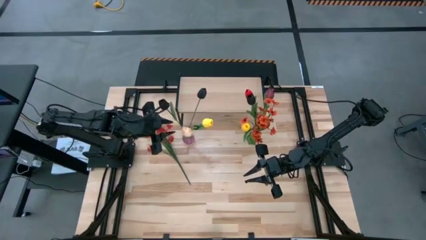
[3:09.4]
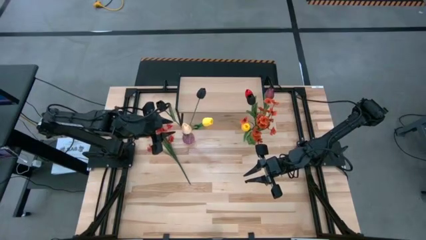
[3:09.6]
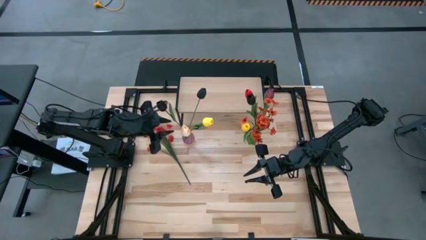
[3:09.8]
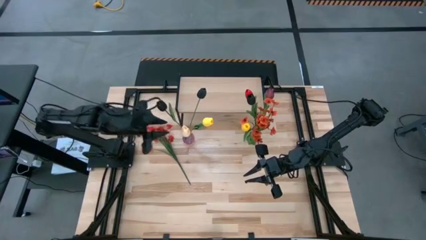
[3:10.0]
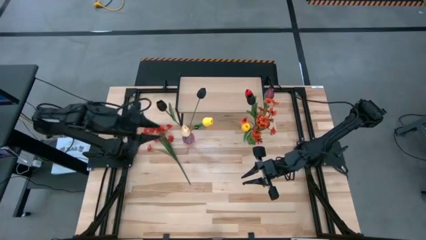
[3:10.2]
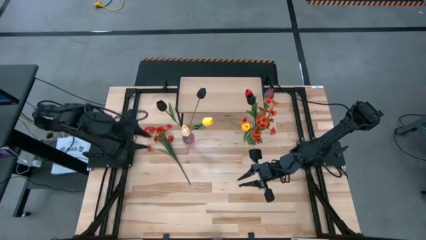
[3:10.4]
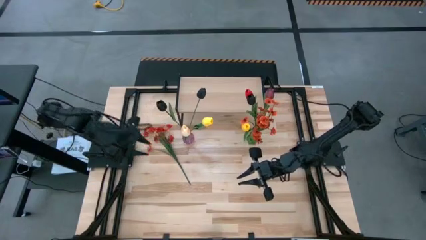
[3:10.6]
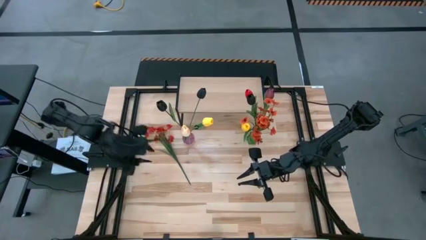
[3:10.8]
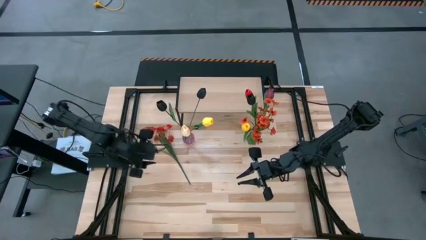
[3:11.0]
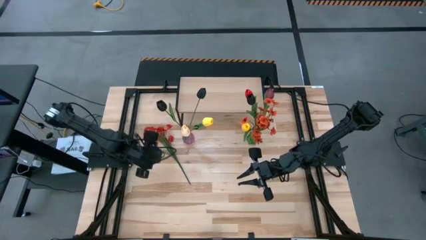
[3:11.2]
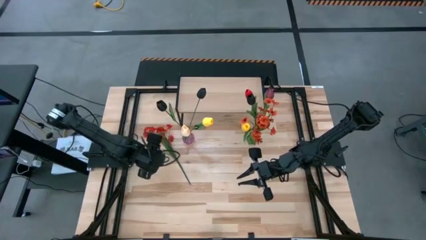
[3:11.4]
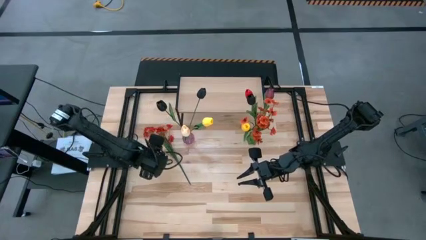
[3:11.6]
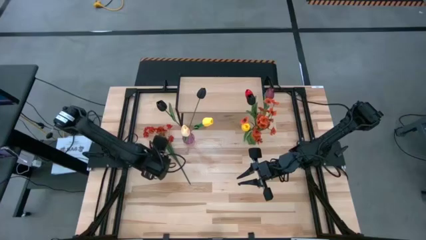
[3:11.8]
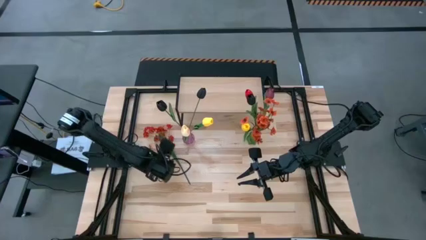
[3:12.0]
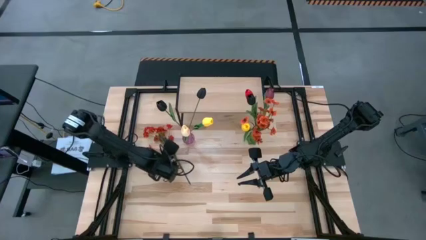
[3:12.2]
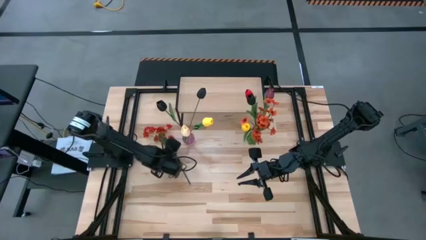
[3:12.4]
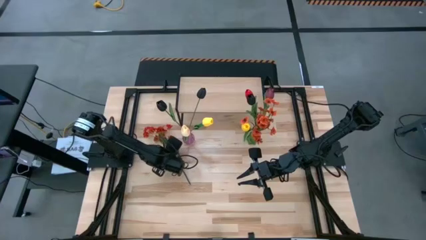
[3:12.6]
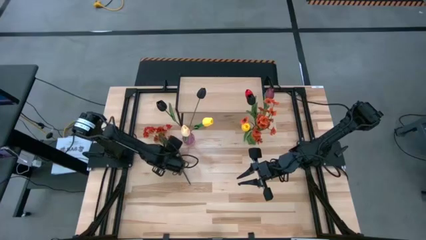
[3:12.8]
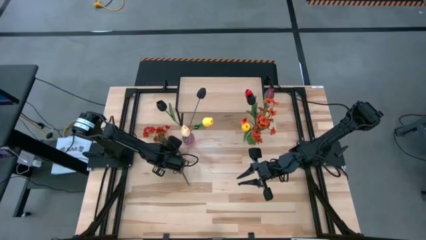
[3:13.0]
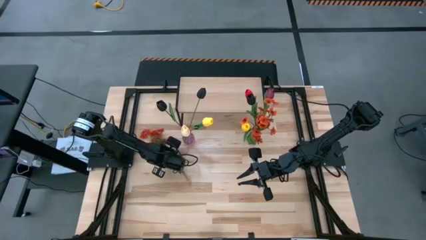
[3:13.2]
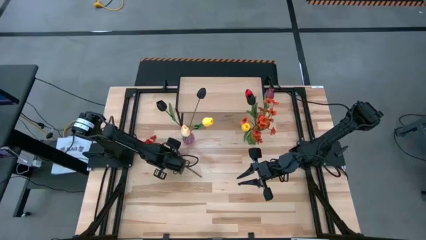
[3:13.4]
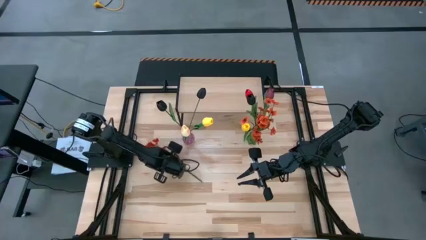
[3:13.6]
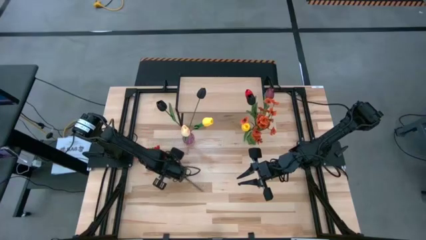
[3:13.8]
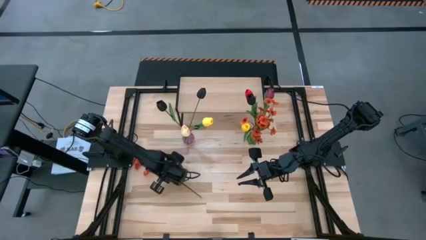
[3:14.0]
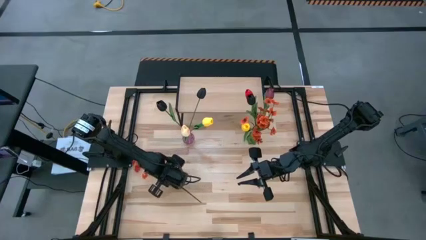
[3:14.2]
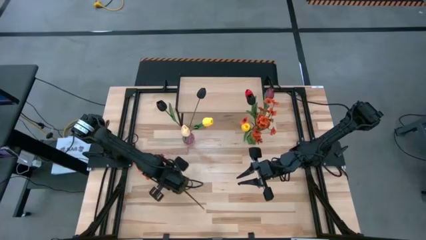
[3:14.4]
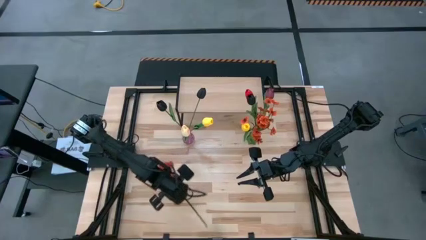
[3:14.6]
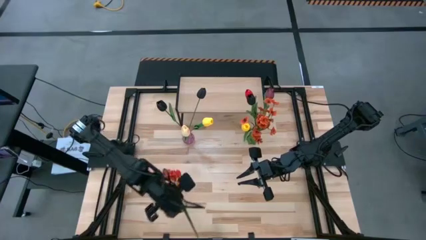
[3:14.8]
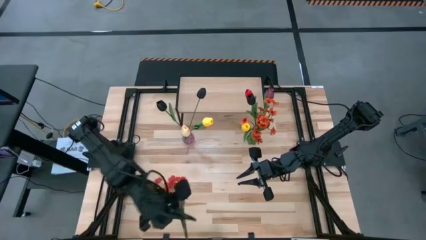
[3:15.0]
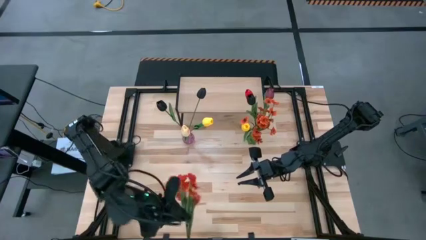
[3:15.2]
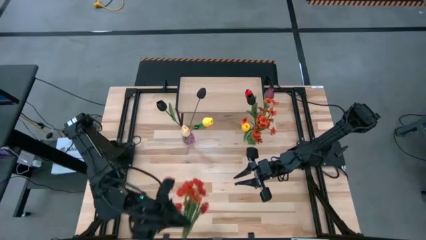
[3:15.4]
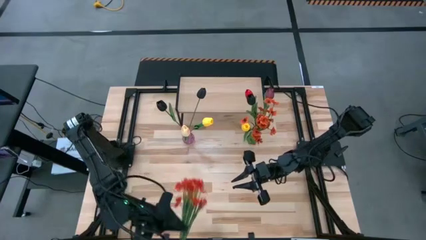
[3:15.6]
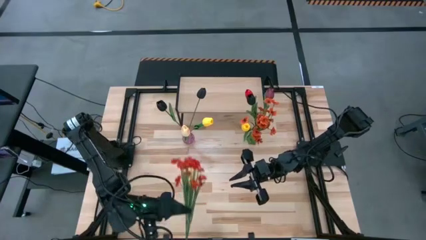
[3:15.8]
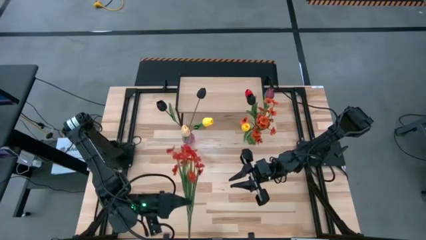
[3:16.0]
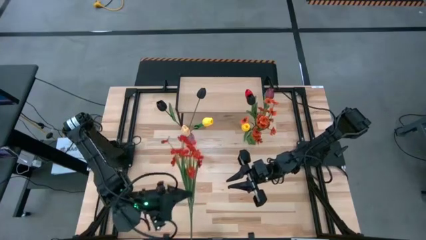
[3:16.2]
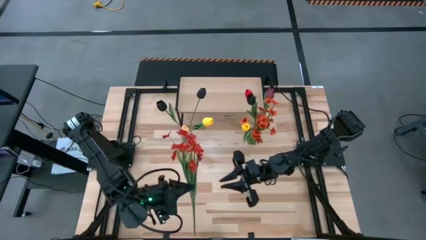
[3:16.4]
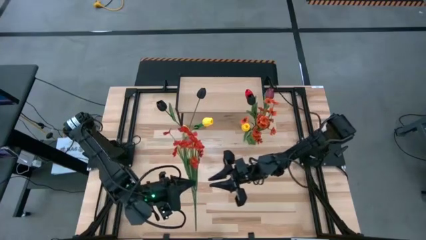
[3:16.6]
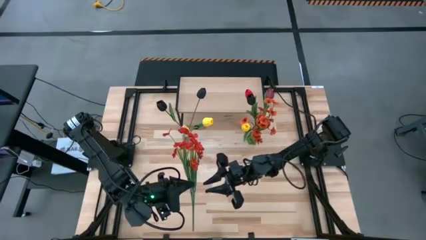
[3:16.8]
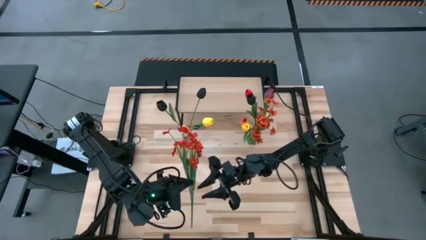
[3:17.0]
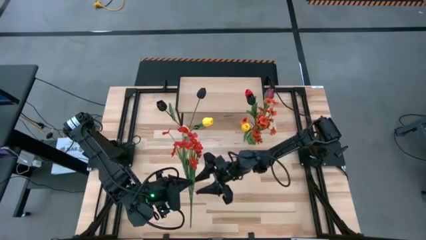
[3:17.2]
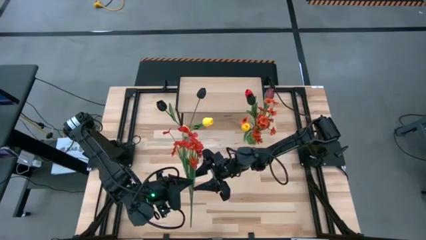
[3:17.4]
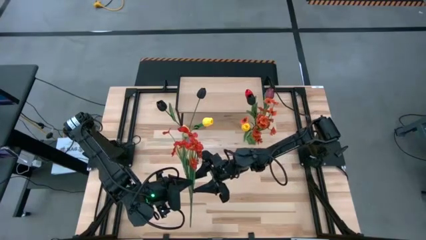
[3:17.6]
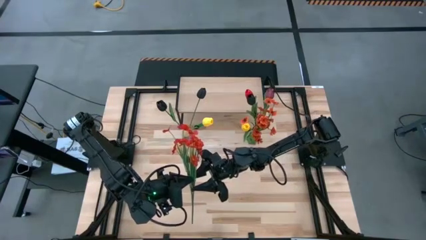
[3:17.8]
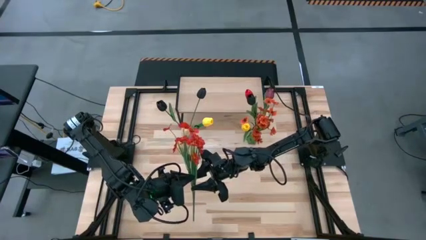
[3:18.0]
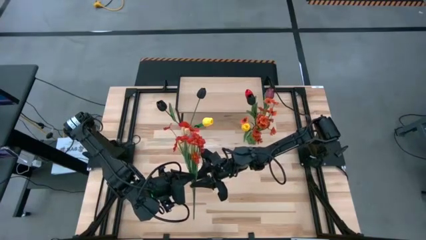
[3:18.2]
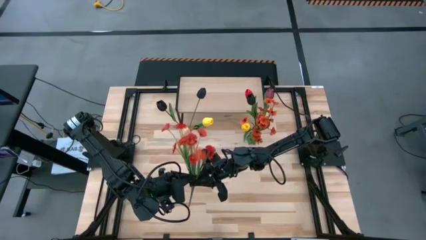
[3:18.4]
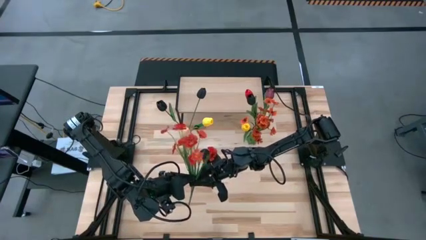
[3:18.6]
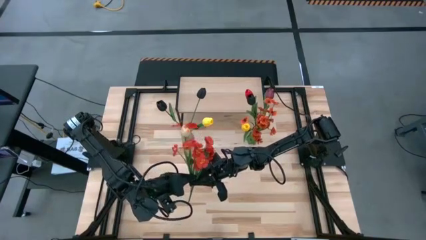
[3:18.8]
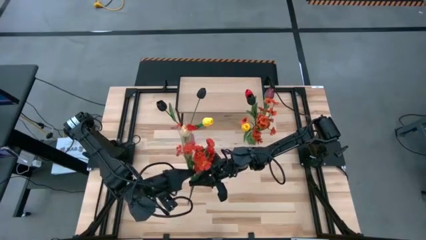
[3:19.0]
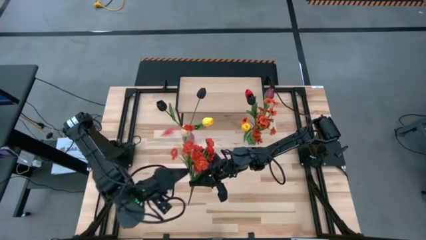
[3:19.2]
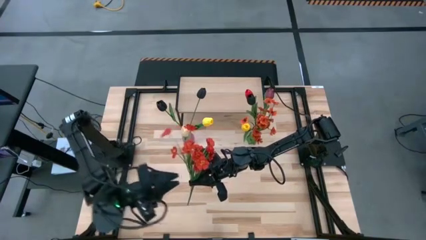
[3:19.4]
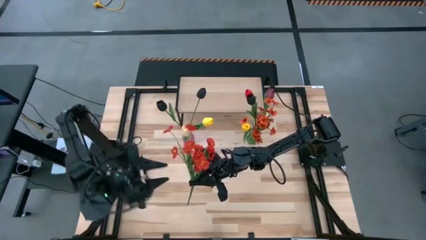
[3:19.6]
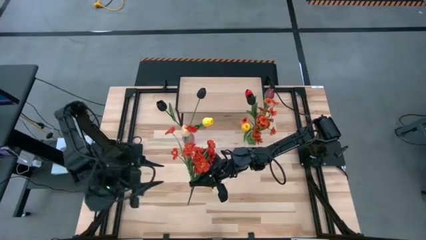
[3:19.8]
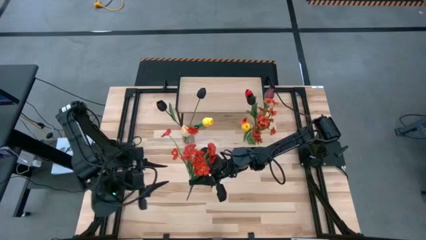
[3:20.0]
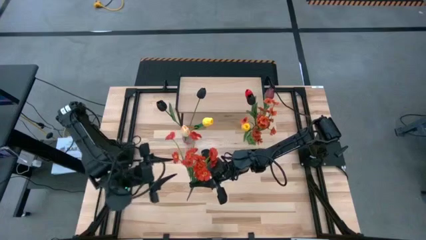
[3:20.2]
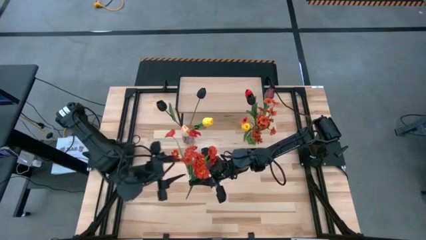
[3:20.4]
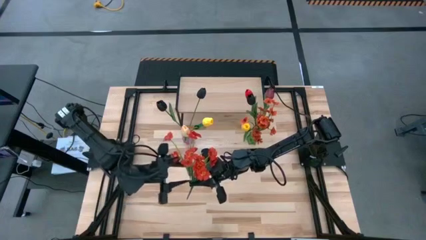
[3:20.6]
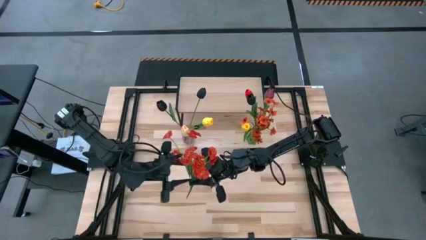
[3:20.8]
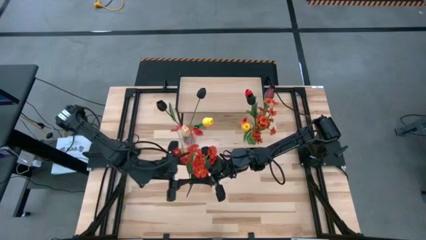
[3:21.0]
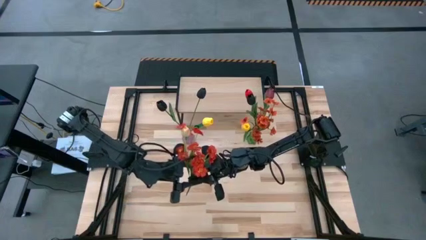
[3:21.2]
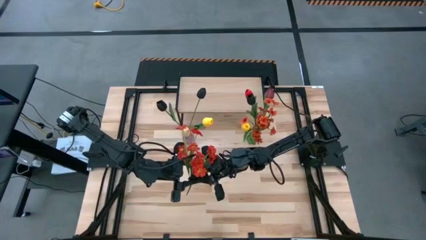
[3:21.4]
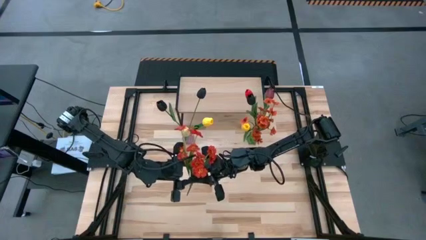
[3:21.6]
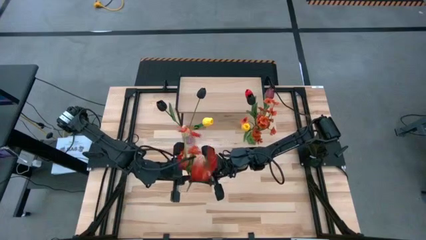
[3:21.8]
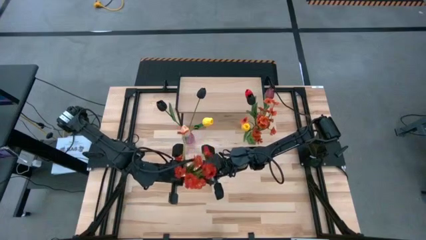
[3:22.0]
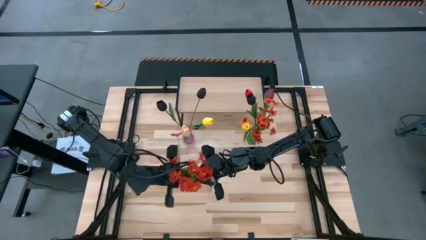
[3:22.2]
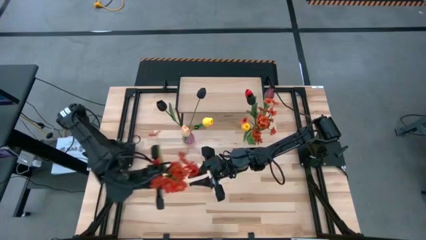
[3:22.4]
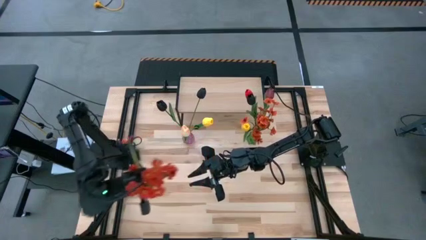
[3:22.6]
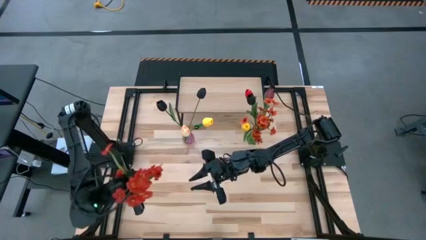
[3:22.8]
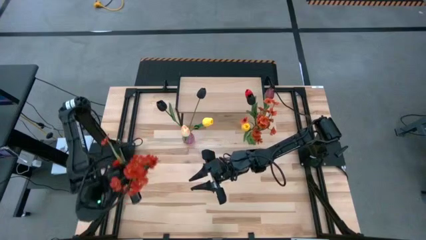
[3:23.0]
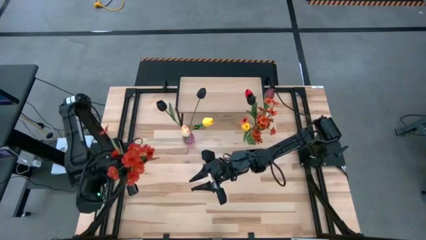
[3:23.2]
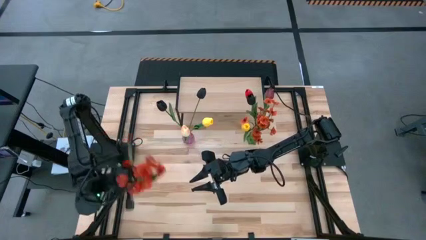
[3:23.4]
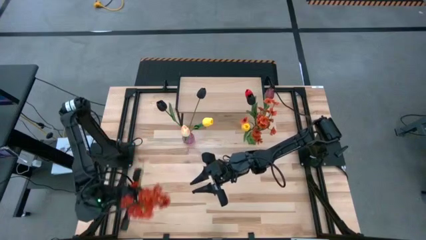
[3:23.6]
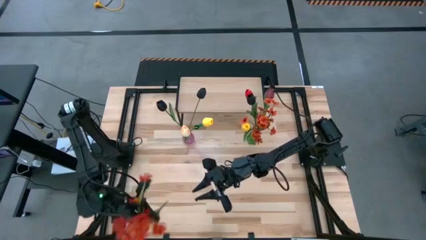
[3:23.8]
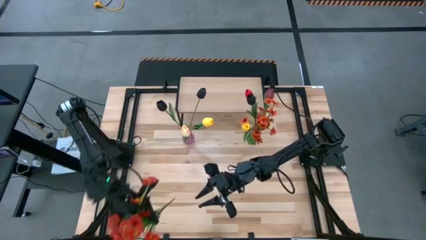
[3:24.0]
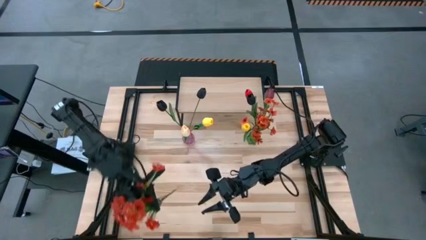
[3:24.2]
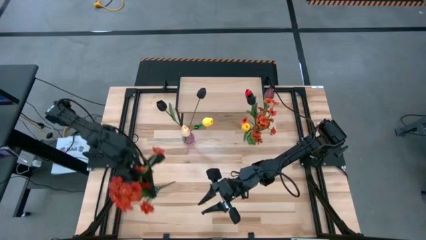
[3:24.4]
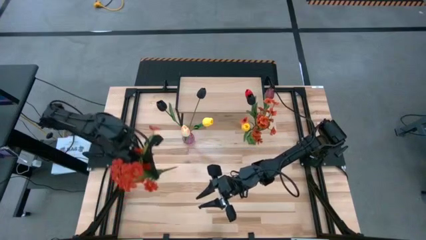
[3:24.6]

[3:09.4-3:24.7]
Task: Pick and place flowers into a vace then onto a shelf
Put the orange flowers into the purple vase

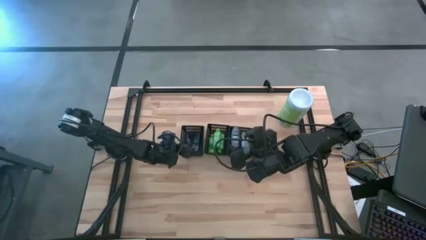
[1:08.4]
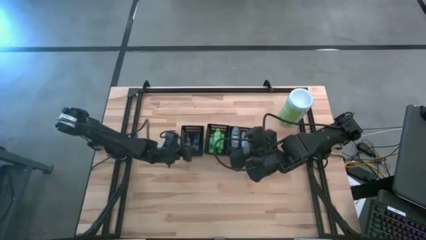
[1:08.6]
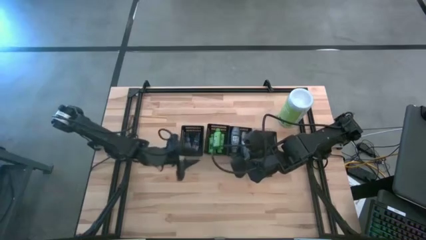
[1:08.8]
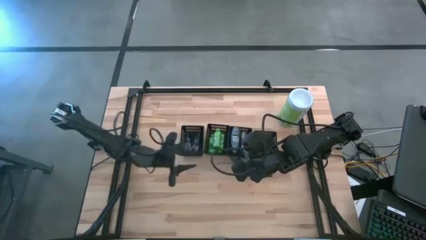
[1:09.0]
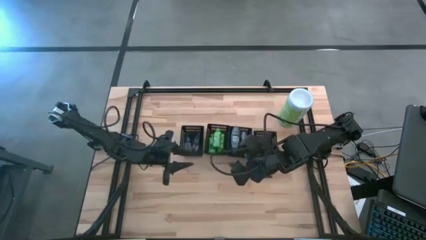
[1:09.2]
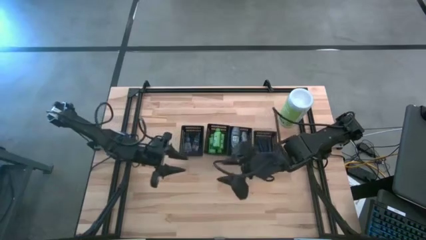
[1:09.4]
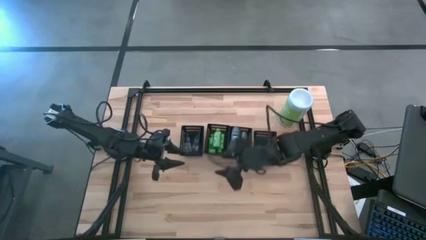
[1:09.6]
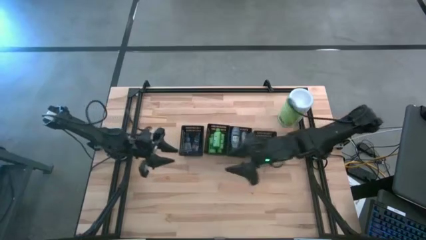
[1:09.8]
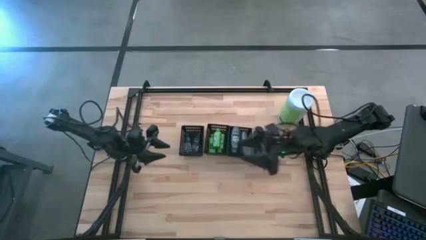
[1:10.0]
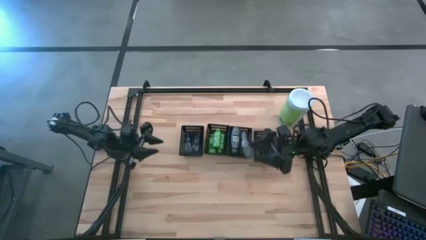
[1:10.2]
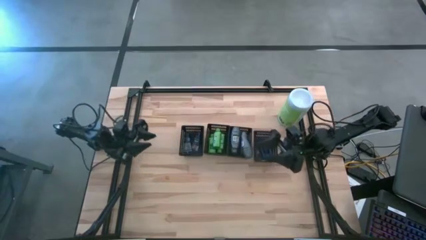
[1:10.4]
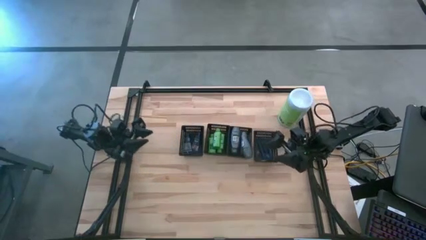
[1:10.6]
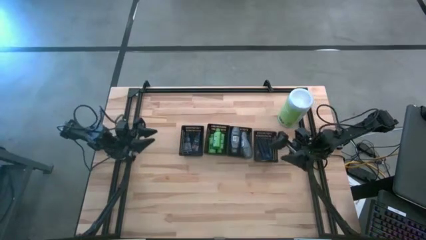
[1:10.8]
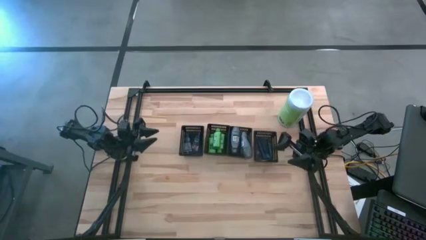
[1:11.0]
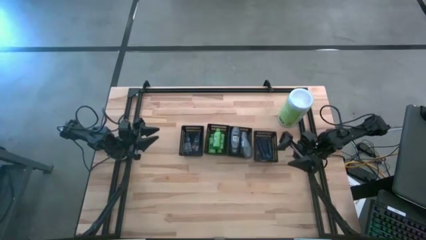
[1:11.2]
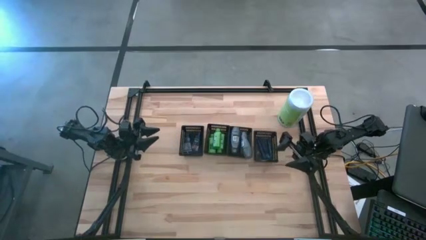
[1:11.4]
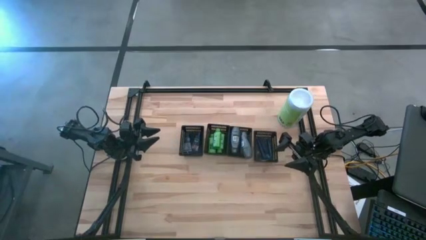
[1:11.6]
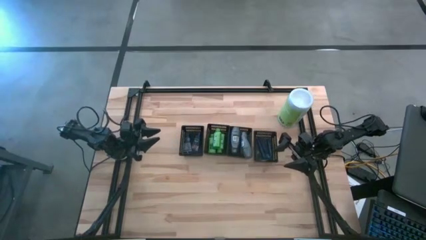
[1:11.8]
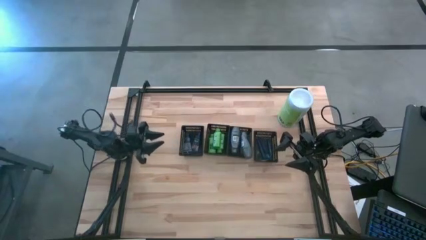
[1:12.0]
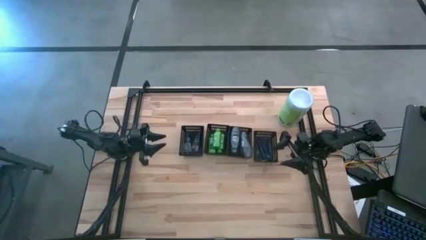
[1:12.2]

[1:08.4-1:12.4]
Task: Pick & Place Travel size toiletries
Return to Home Position
